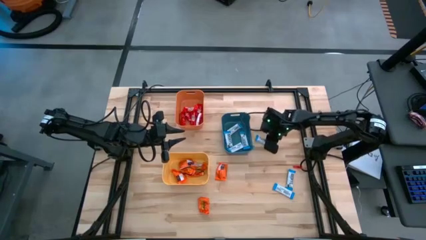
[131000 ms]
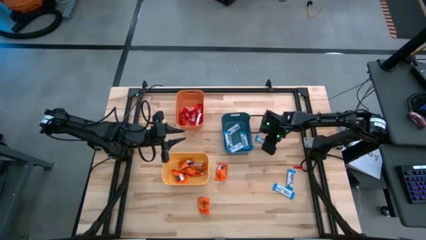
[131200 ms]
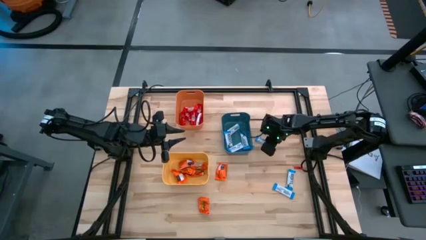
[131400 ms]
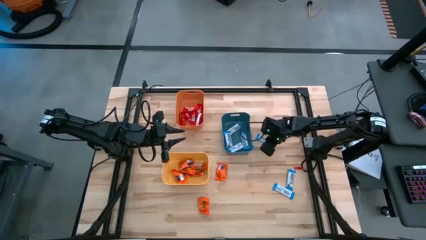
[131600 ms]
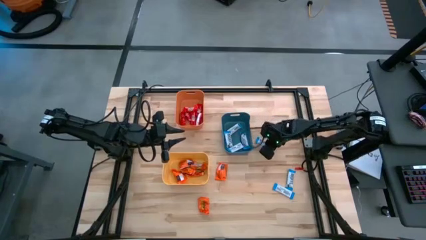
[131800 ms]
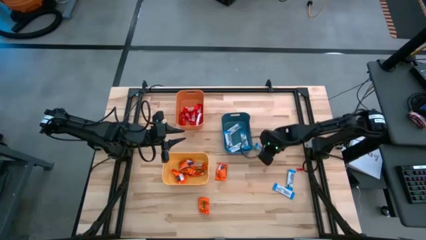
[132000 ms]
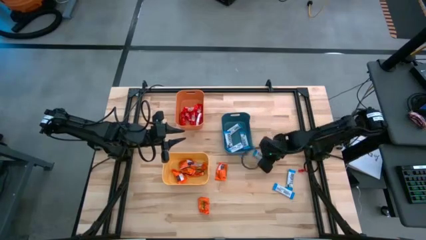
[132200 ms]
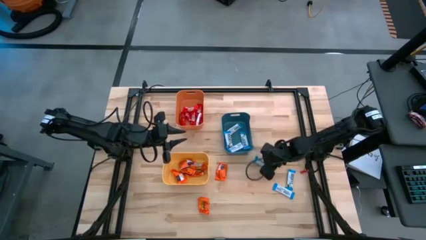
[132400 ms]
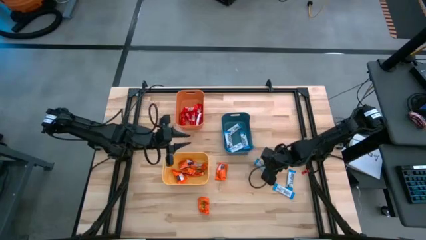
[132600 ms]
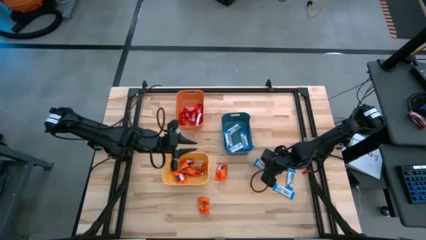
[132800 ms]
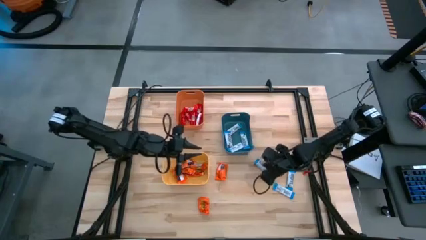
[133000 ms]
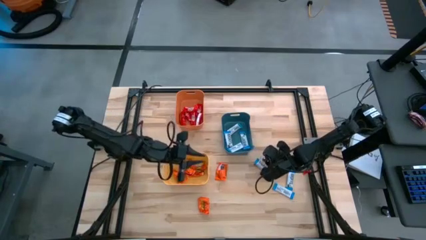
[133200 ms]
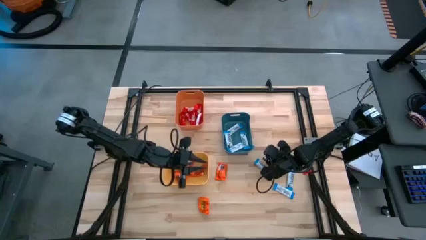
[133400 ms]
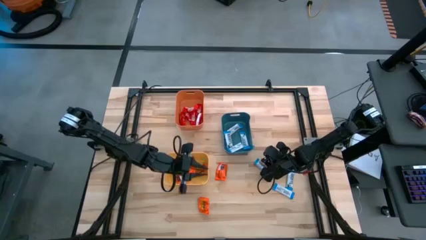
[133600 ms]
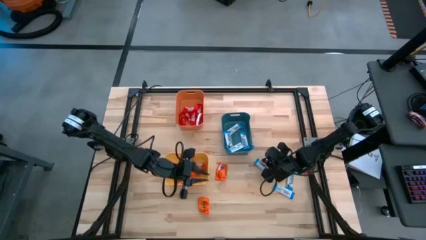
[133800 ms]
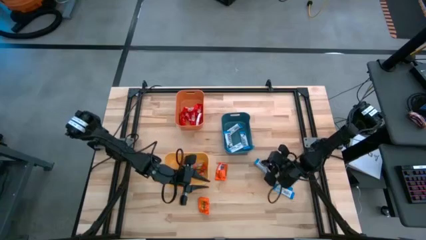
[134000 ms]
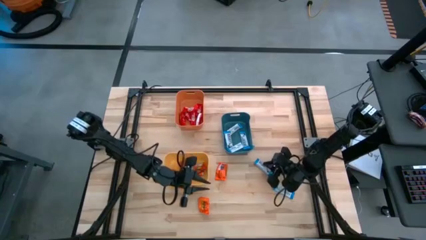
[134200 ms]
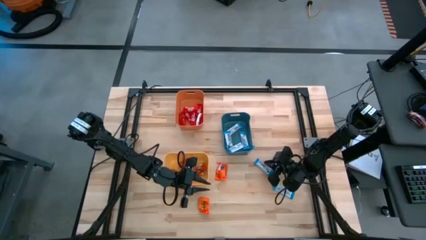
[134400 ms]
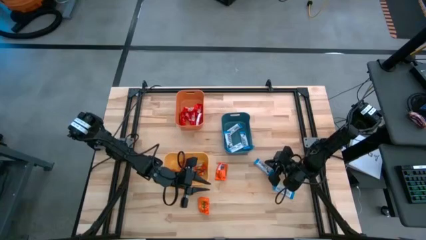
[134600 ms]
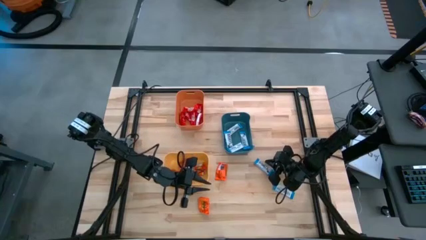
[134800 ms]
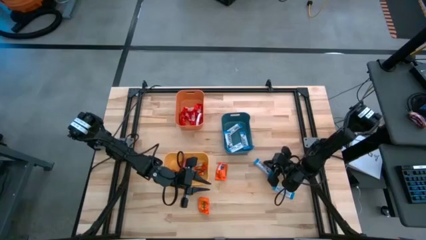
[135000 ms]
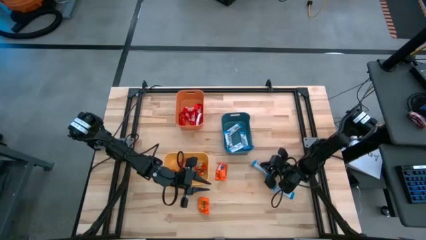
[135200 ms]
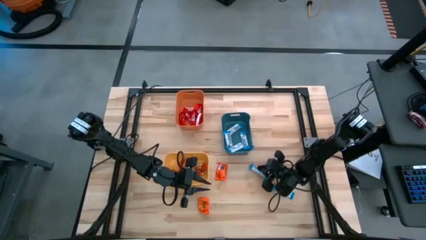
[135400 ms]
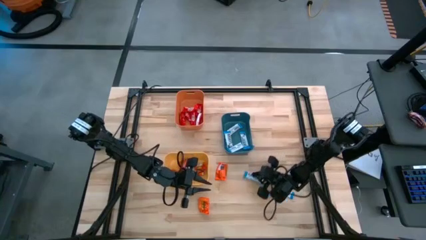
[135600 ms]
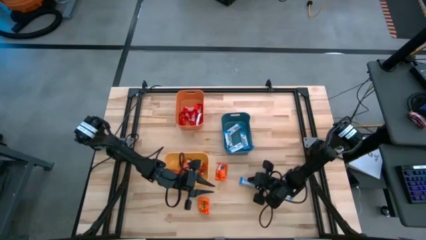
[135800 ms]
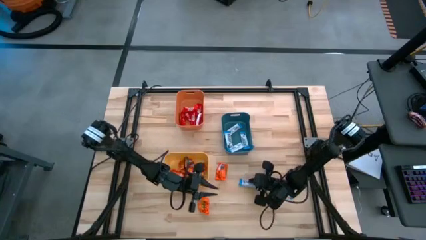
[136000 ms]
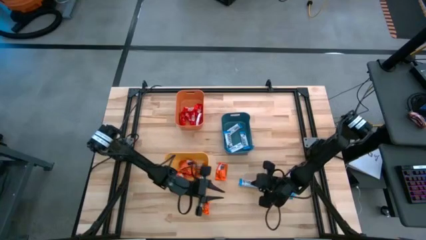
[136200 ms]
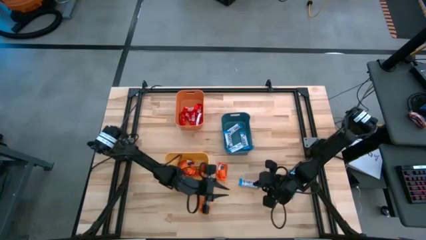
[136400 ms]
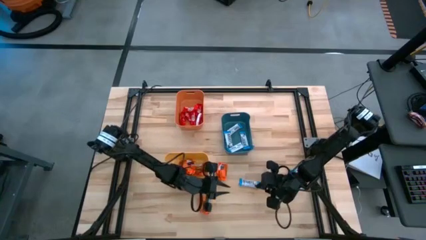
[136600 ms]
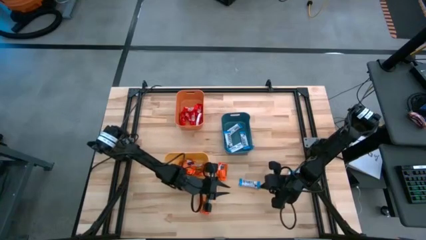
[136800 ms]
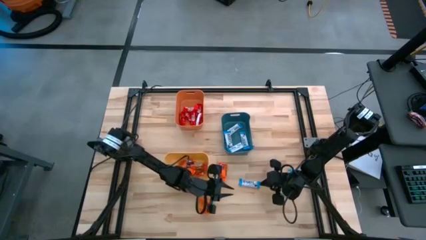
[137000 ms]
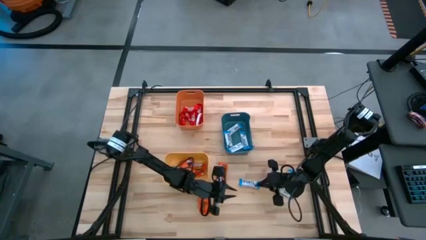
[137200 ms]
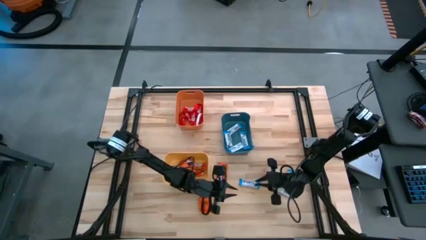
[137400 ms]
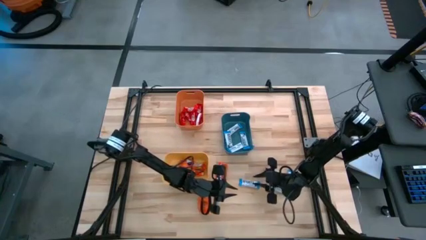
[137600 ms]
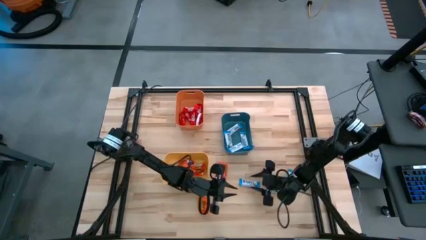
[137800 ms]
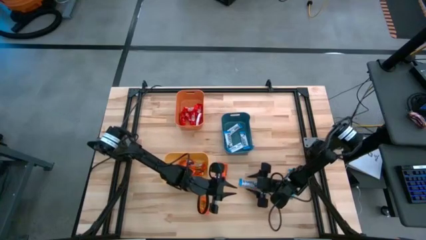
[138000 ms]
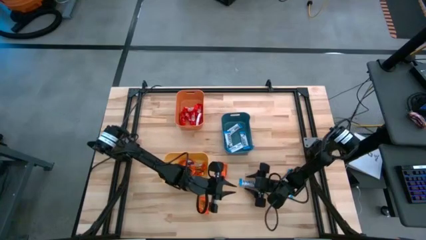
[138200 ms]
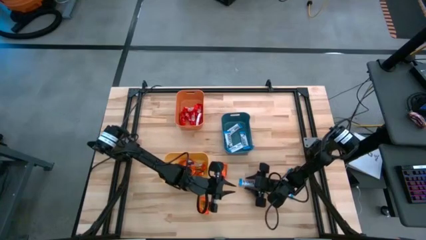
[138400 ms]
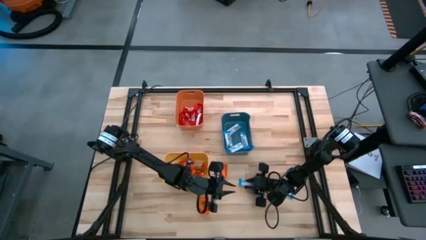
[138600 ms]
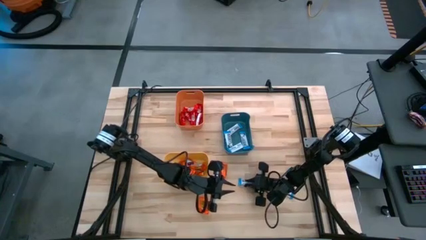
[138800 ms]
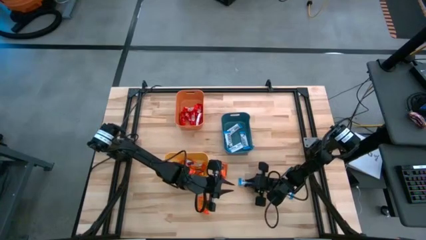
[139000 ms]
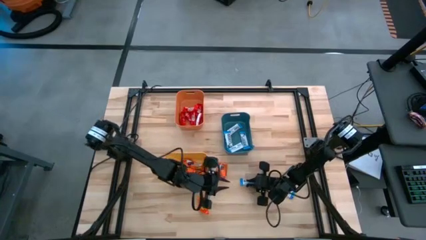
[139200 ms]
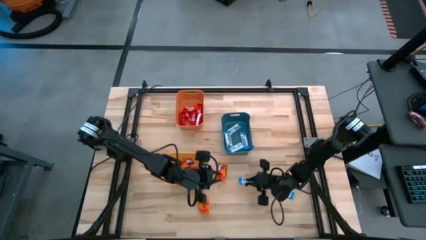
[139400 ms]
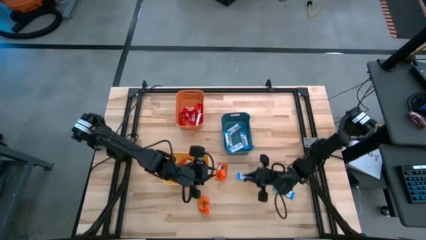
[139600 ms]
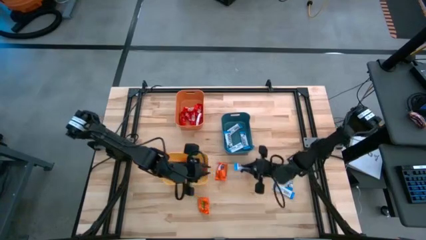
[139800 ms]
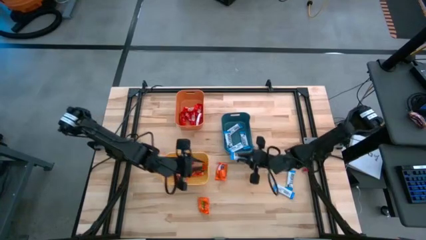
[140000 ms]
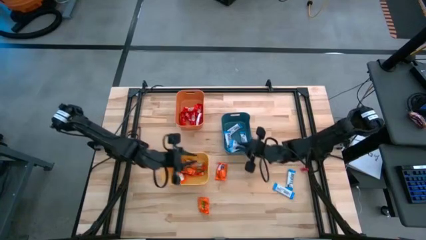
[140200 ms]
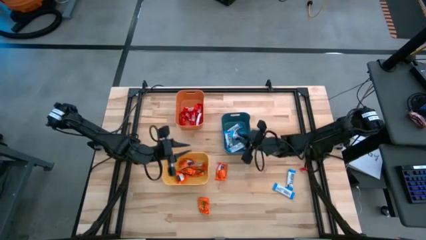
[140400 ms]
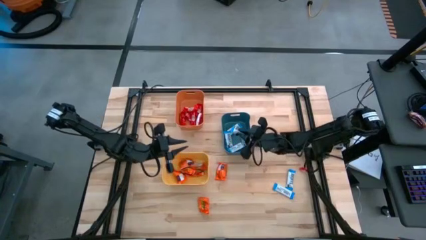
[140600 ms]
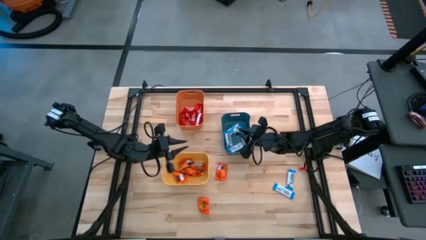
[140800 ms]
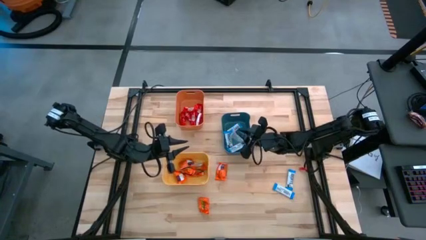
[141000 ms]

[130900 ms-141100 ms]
Task: Organize candy in baskets
Put the white chocolate into the blue bin

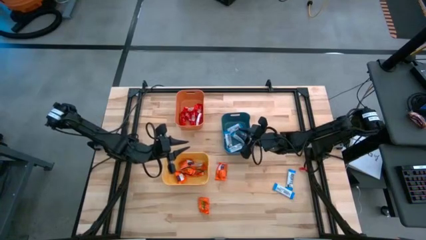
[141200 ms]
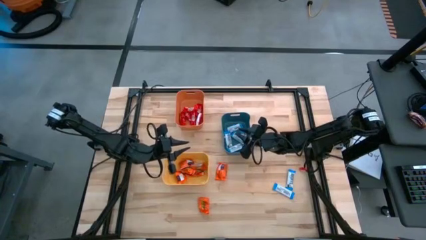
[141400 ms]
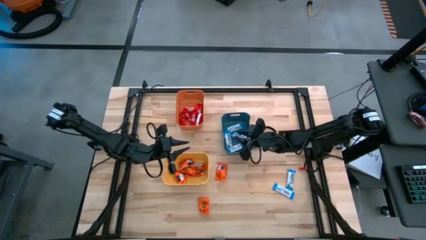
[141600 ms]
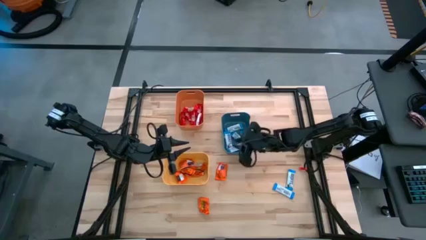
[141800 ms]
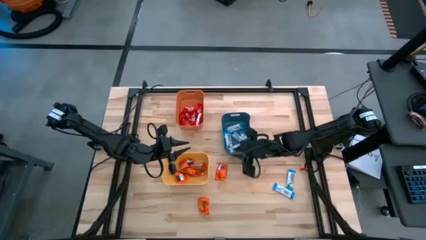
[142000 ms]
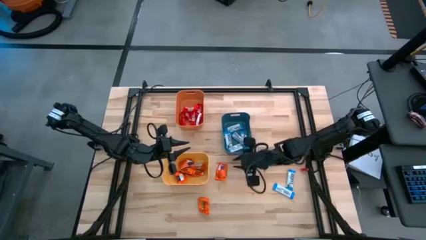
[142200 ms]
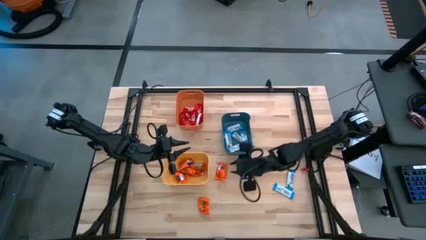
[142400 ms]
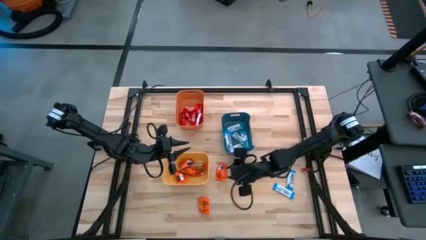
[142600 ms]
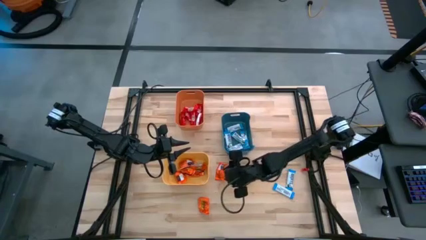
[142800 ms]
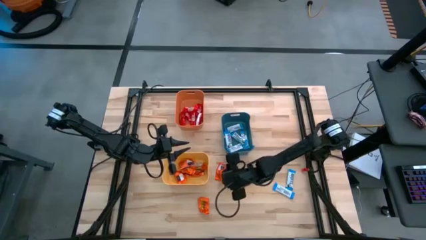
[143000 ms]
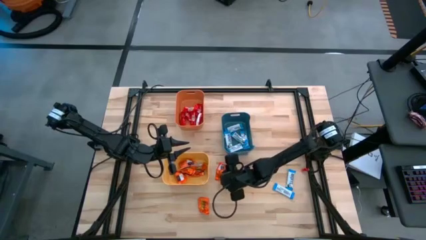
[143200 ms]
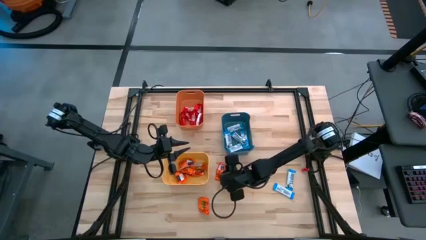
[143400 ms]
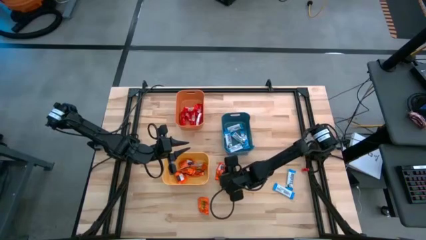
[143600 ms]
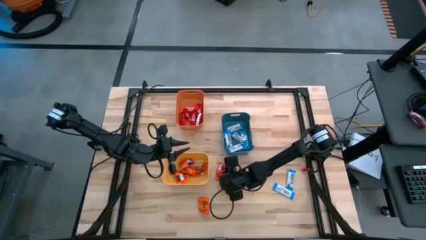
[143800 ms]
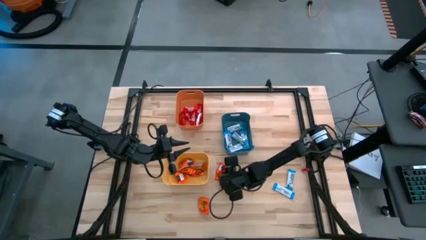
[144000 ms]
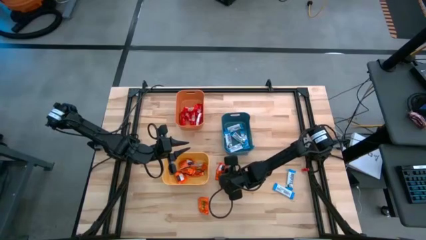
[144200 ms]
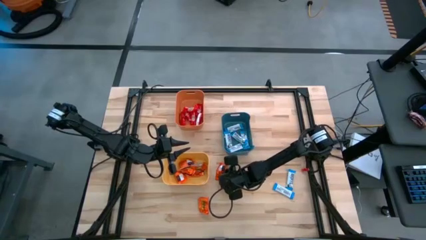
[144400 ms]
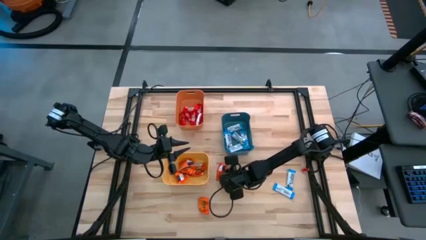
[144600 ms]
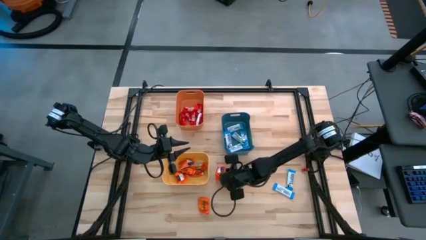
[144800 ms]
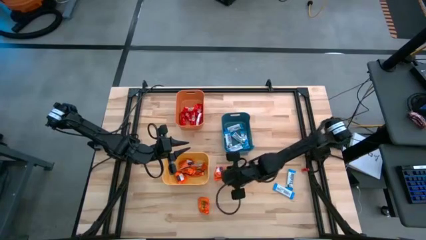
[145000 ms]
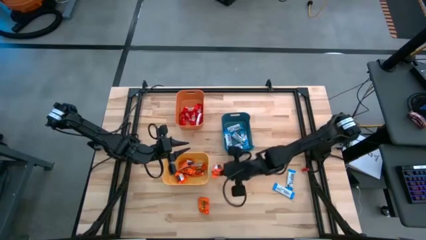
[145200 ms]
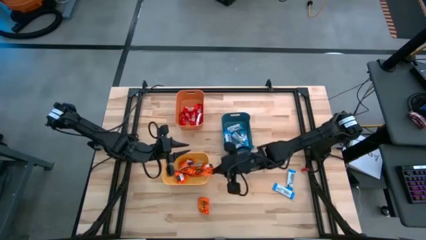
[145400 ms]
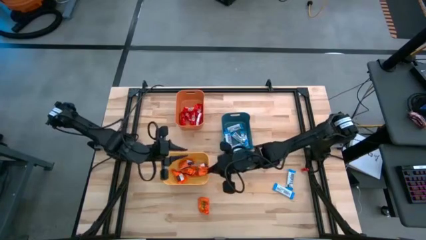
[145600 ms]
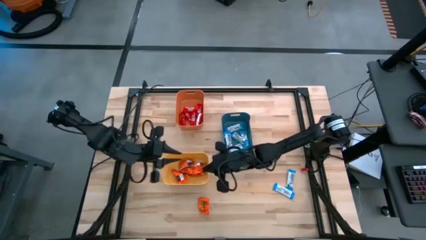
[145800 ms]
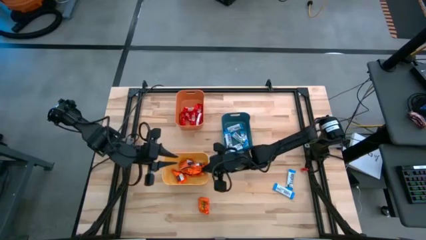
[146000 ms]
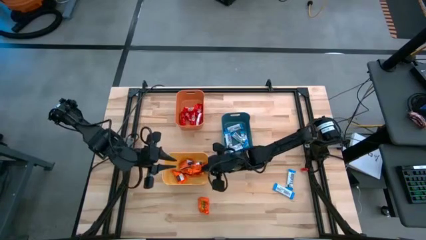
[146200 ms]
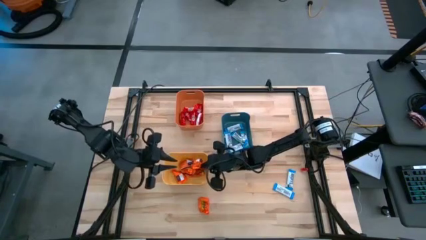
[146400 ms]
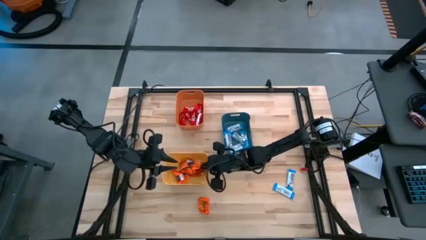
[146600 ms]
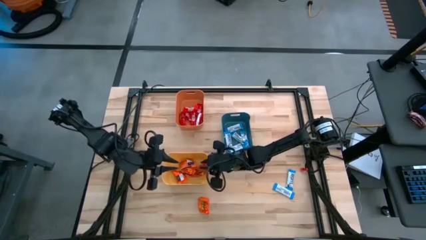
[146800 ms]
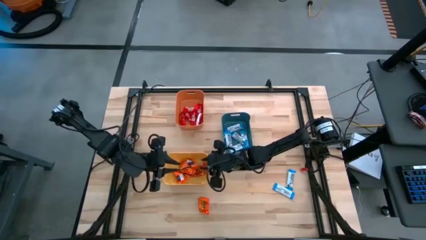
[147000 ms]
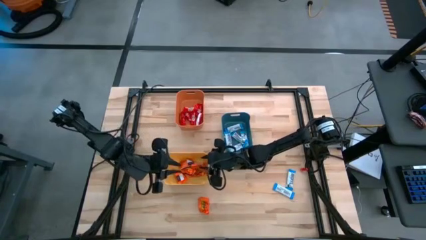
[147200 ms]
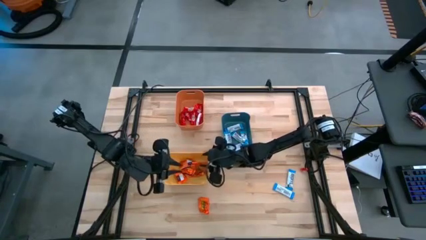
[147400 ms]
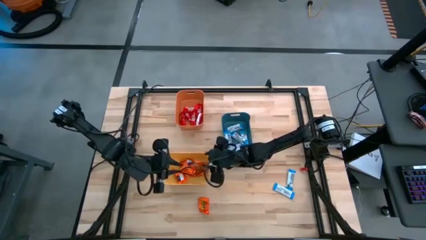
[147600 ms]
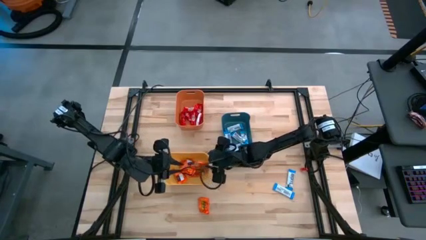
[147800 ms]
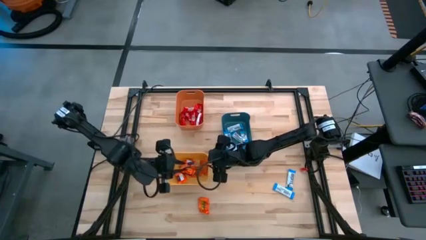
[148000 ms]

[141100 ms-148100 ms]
Put the orange chocolate into the yellow bin
